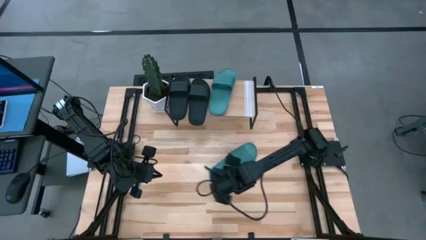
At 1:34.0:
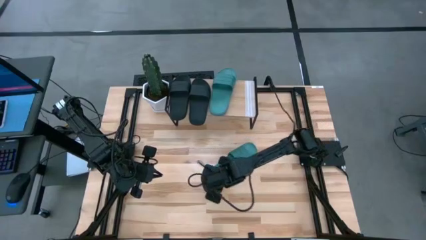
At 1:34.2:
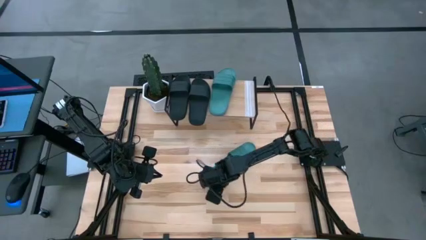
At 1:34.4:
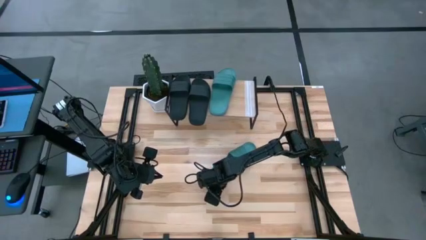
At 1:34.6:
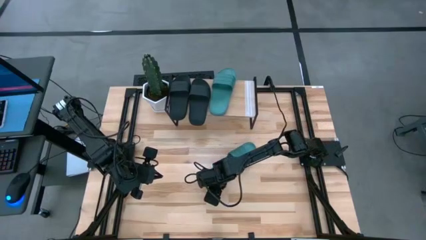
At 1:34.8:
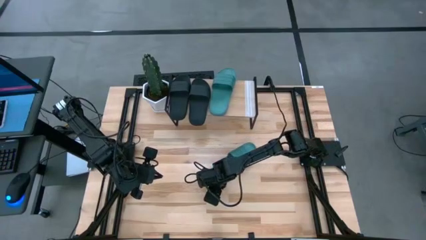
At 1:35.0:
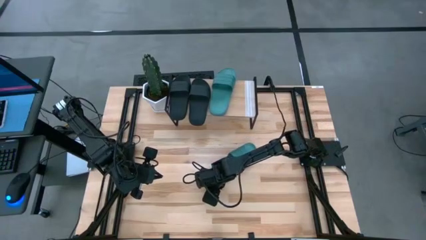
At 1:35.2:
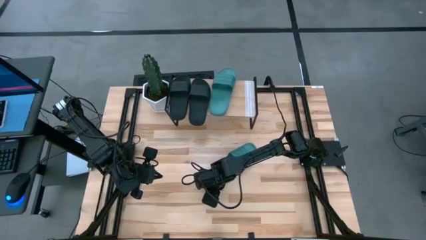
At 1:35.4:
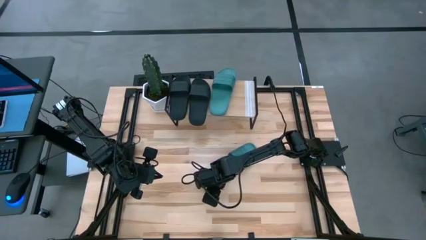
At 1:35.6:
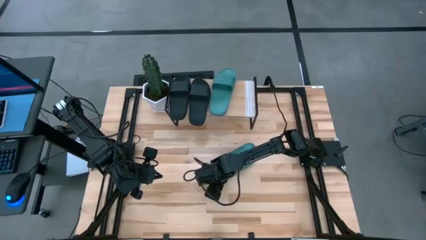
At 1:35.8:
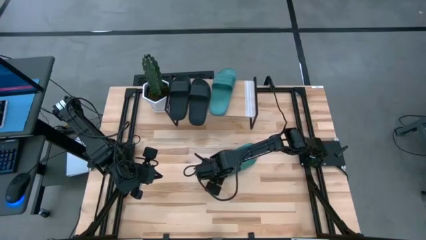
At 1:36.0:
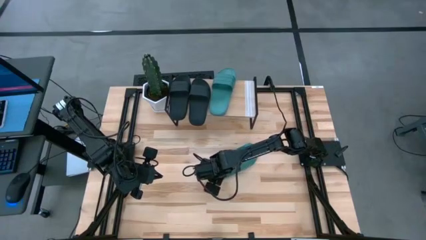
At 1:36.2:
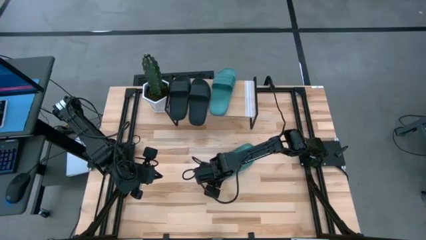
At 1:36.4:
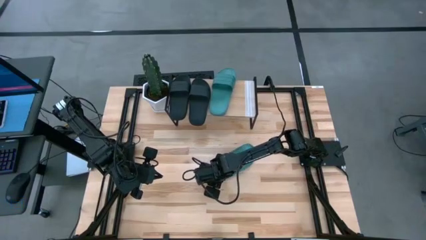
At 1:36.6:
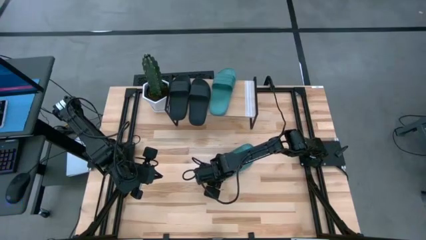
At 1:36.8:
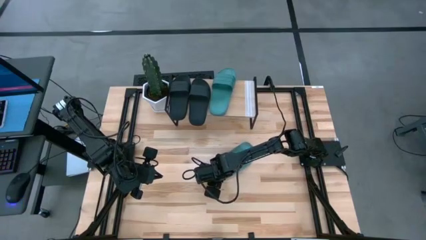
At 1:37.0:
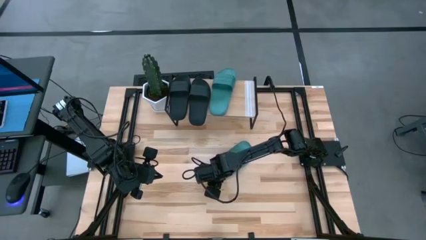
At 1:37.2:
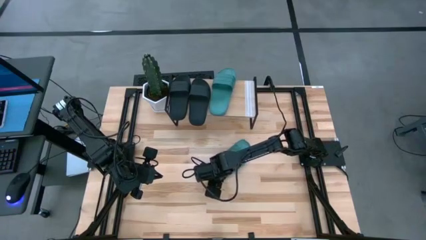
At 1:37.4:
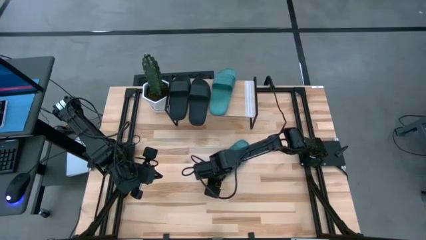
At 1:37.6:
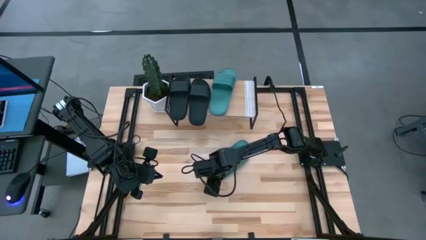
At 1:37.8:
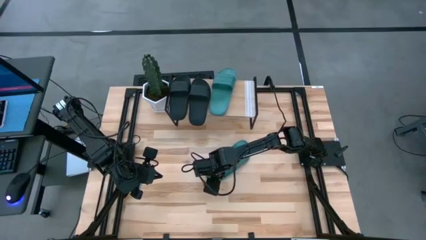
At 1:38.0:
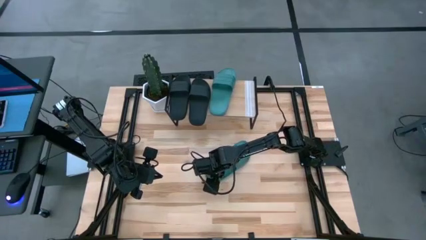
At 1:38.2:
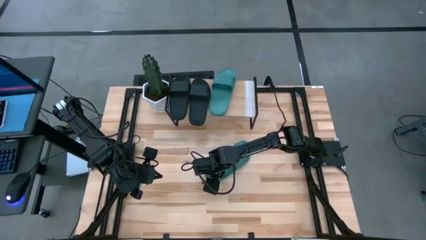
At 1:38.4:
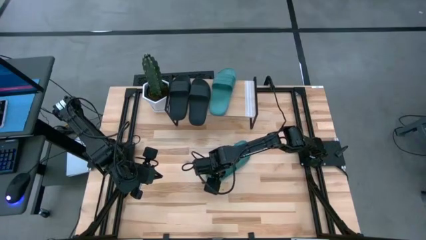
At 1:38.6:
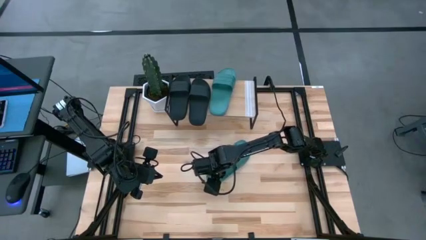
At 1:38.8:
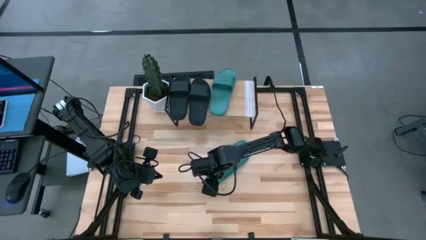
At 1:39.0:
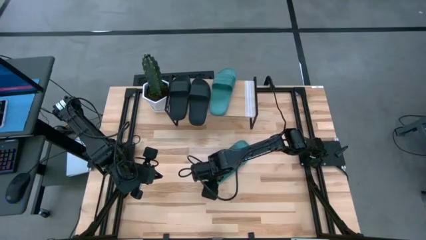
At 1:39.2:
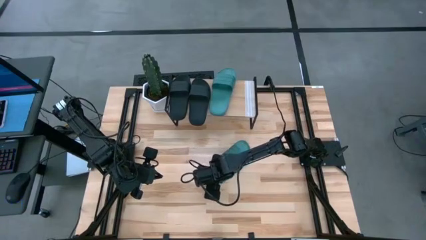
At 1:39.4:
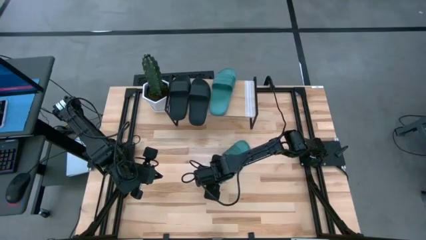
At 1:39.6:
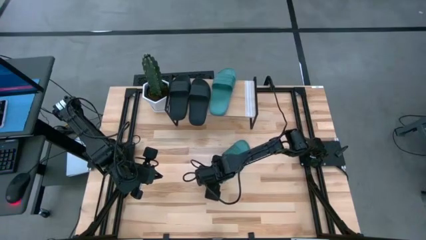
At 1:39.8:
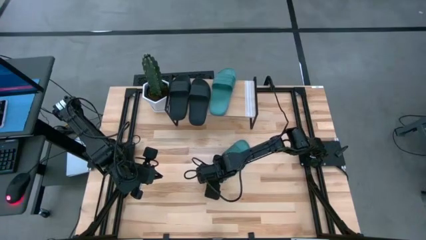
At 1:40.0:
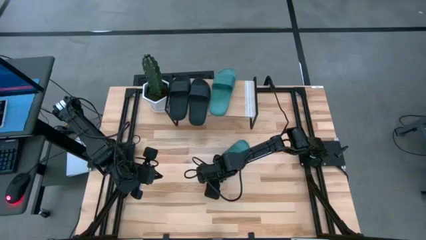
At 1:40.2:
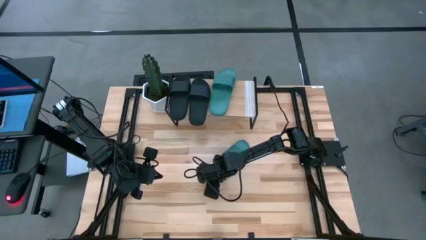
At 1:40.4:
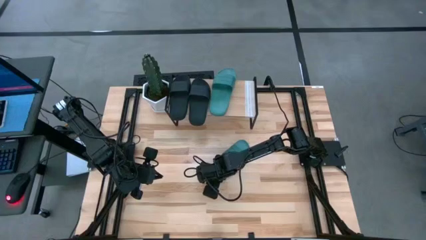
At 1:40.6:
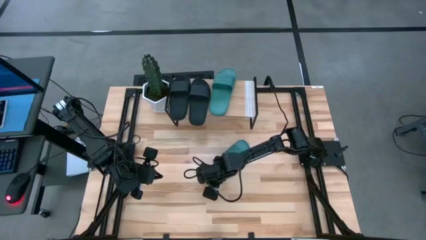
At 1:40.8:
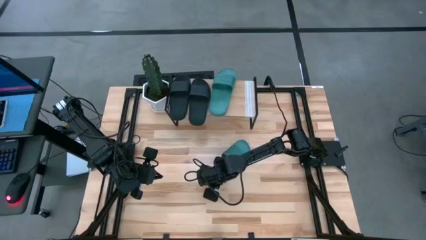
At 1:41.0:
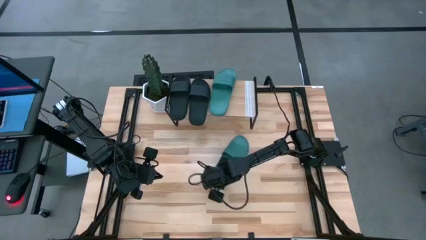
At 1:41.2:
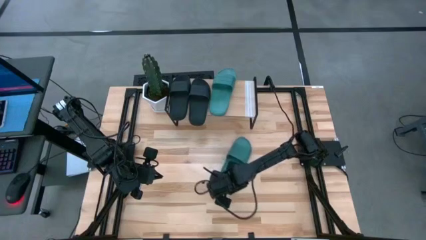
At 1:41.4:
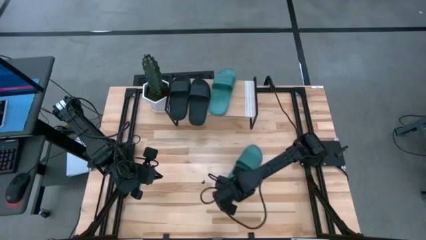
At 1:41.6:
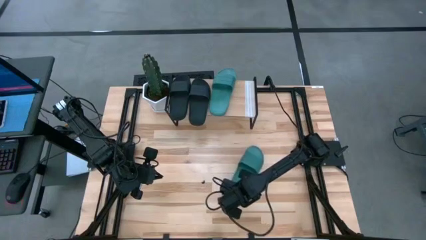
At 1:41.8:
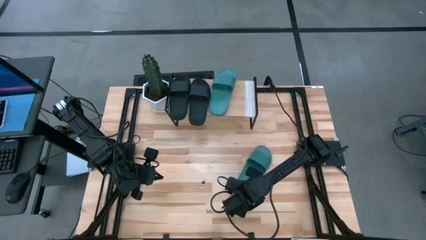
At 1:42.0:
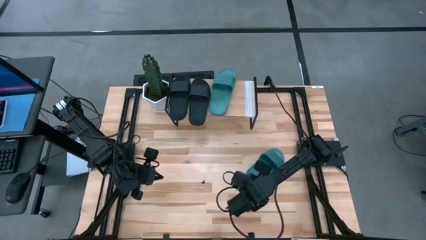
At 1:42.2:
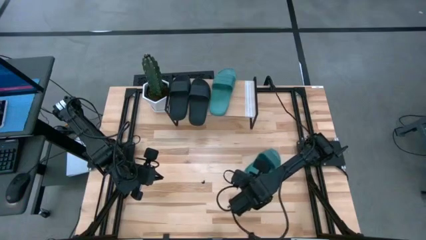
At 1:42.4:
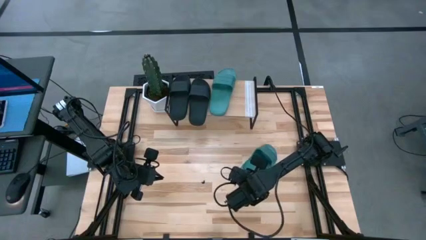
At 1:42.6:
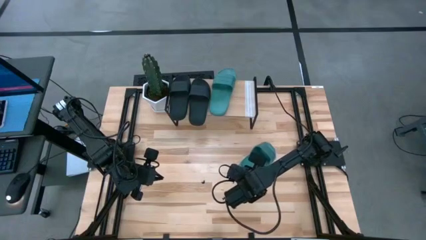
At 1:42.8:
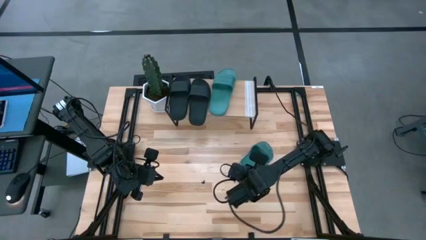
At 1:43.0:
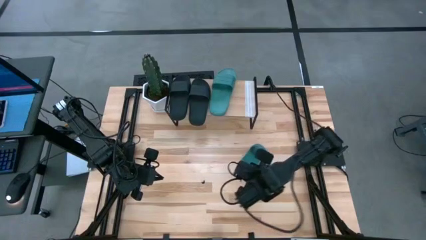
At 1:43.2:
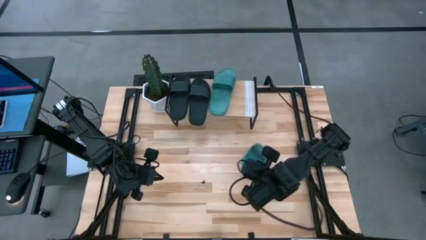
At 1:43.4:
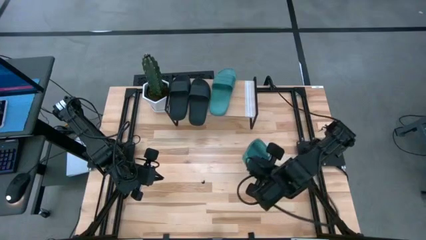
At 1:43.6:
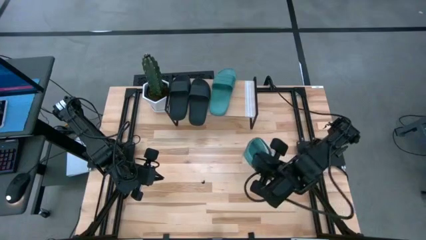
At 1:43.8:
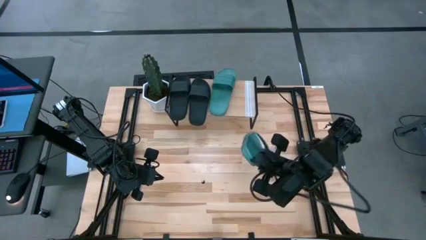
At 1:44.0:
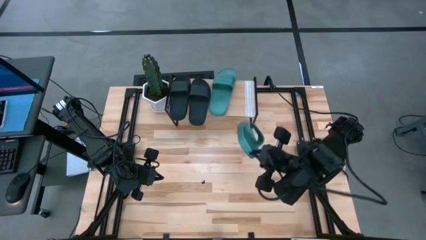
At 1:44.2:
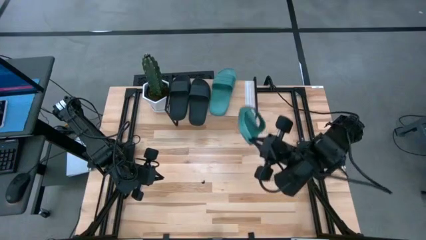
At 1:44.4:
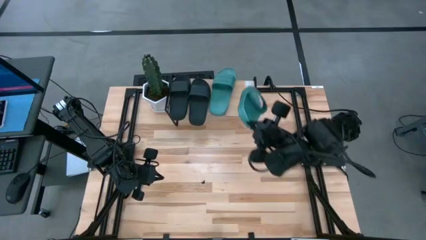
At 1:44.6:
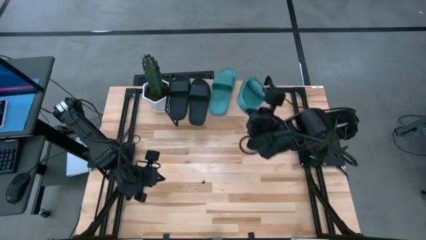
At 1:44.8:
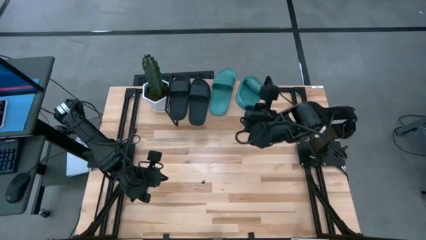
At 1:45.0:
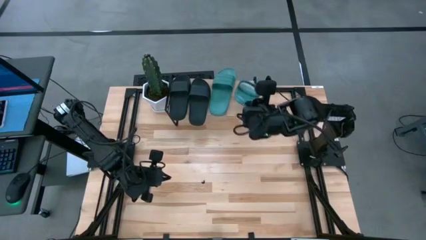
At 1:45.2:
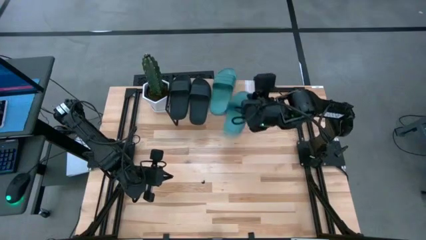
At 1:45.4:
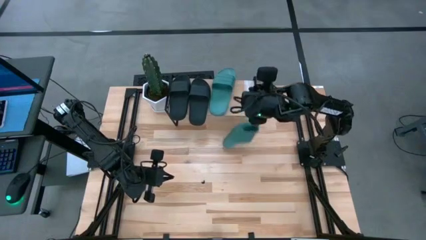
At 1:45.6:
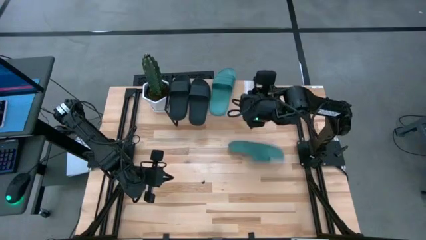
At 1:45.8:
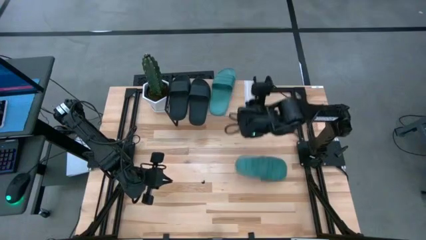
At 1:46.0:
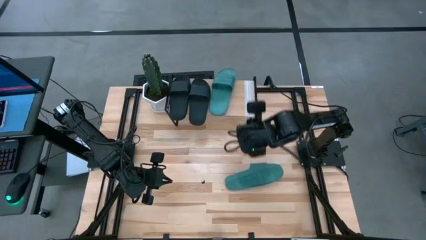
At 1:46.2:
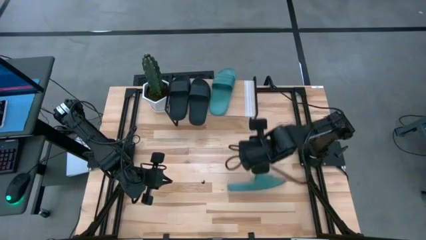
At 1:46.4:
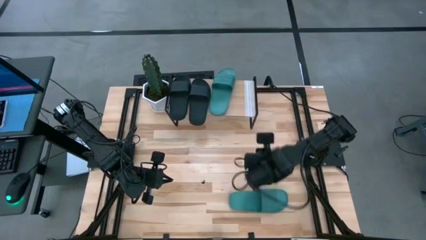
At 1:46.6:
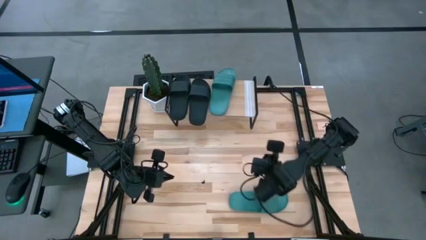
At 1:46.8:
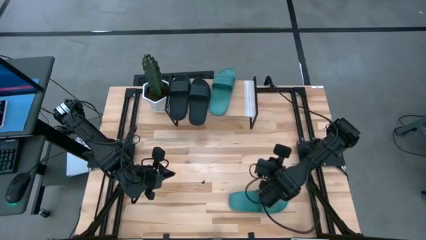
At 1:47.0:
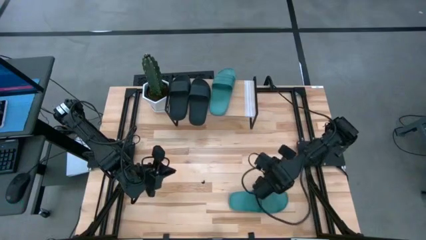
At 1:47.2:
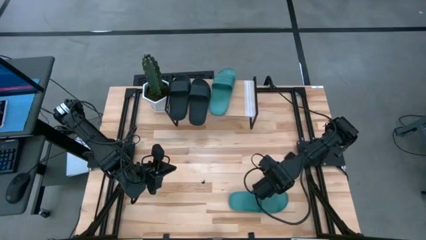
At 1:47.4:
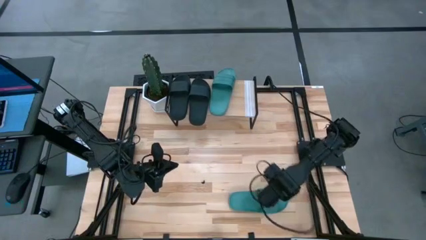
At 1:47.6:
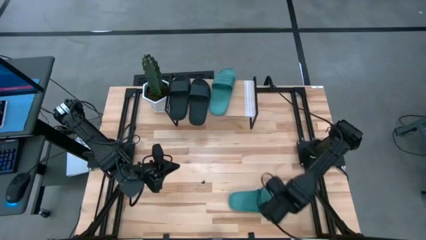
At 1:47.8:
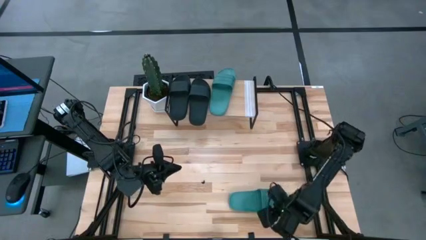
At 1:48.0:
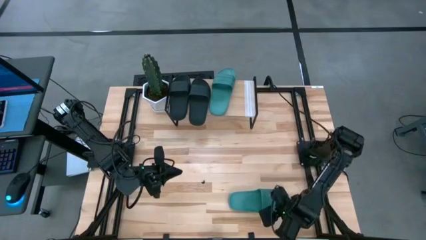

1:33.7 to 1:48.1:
Task: Pick and place slides into the shelf
Put the green slide on the shelf
